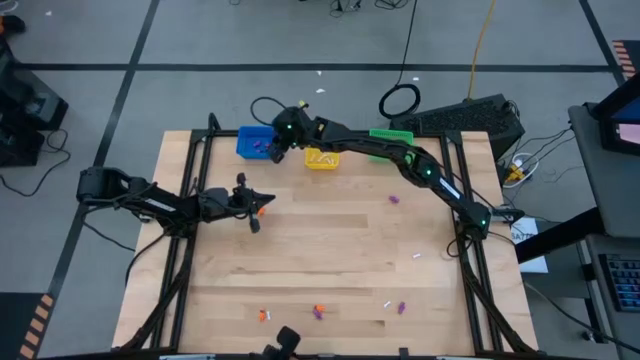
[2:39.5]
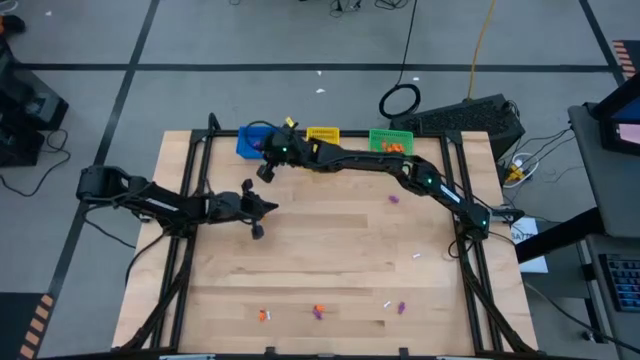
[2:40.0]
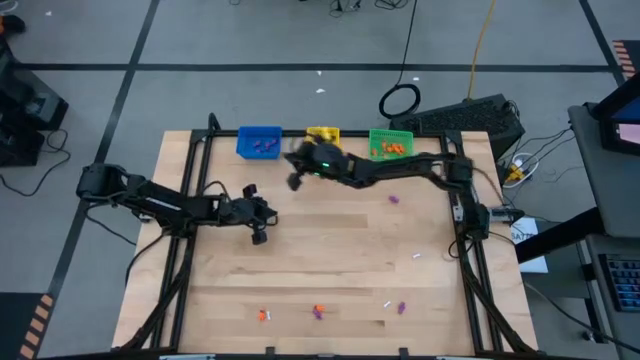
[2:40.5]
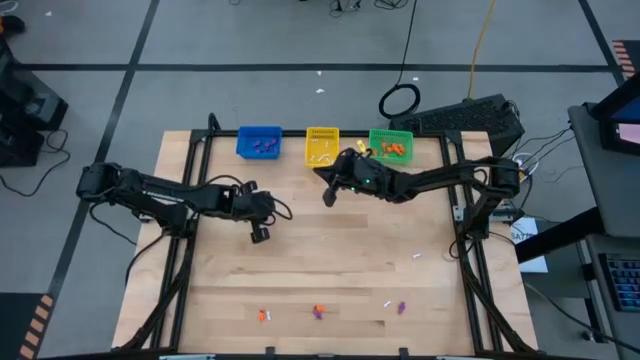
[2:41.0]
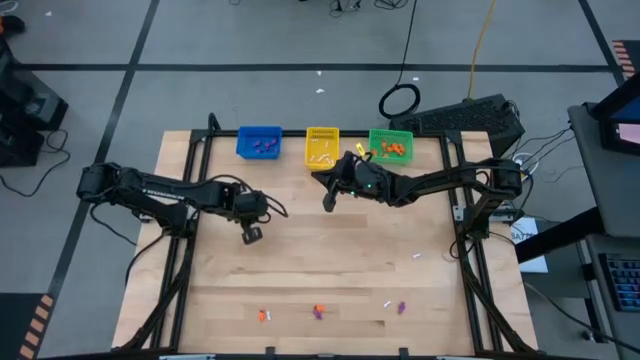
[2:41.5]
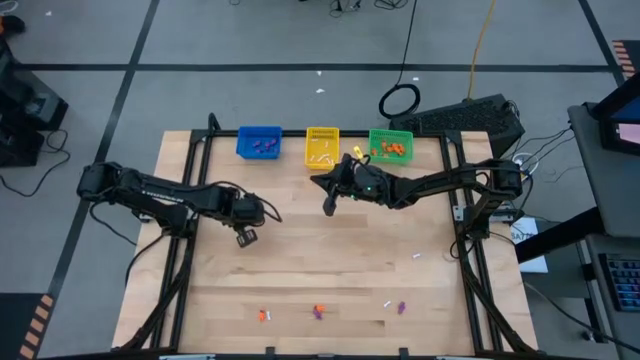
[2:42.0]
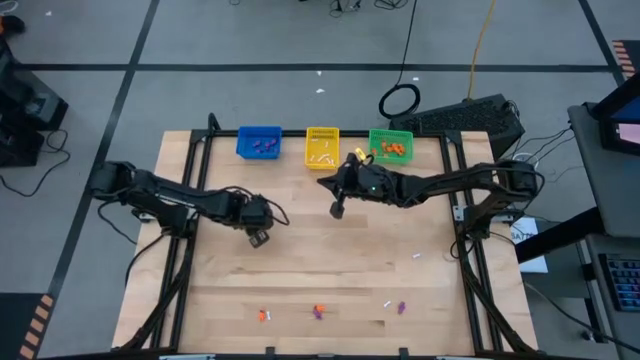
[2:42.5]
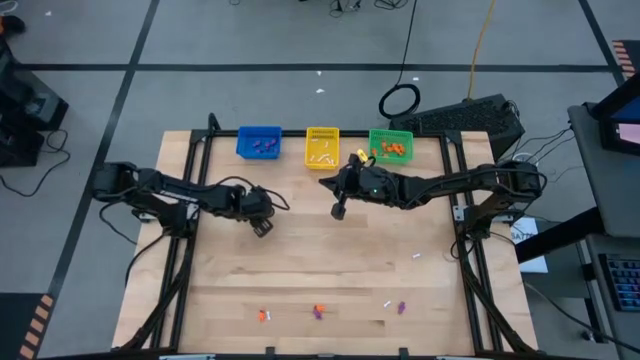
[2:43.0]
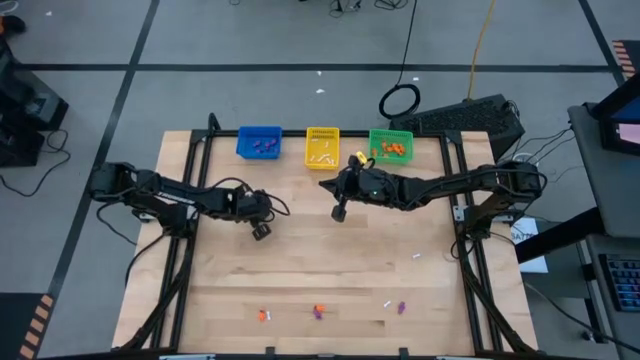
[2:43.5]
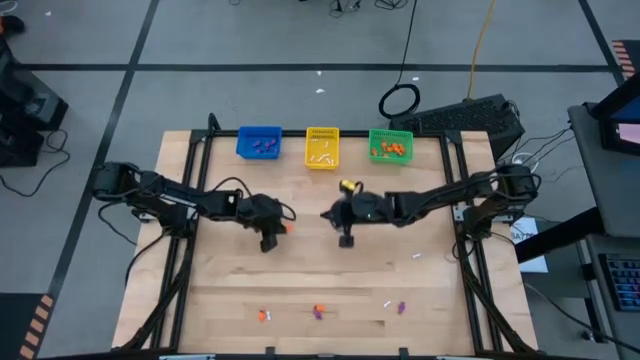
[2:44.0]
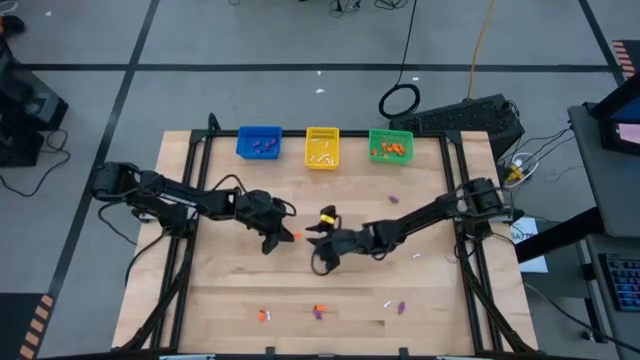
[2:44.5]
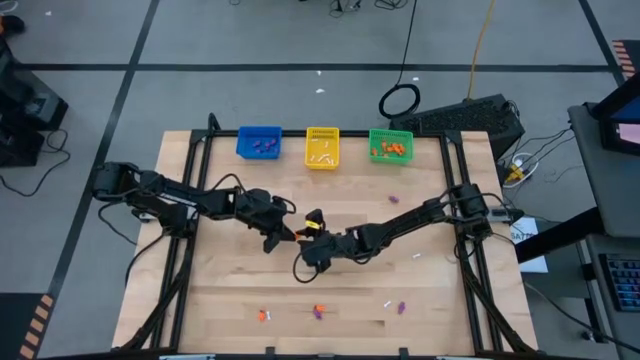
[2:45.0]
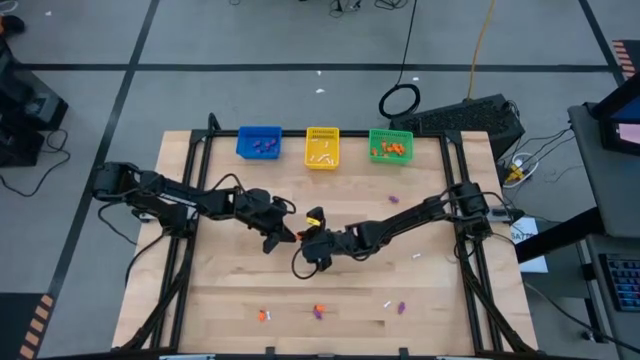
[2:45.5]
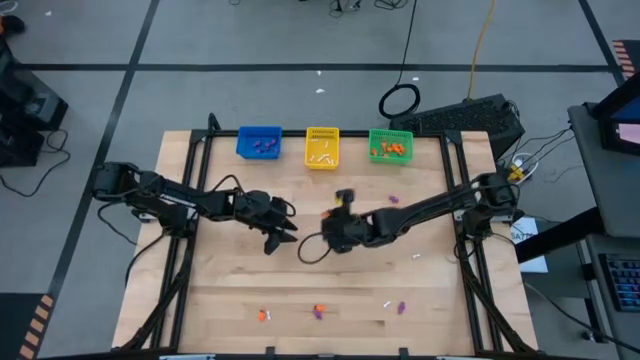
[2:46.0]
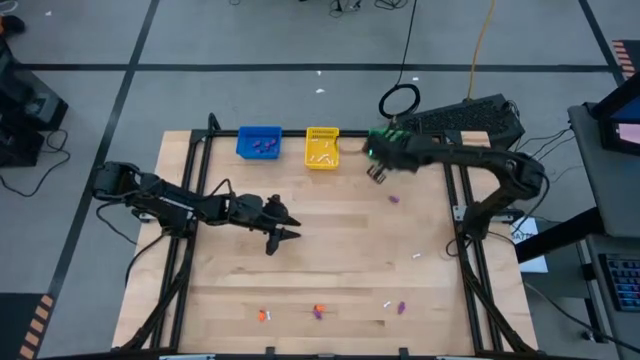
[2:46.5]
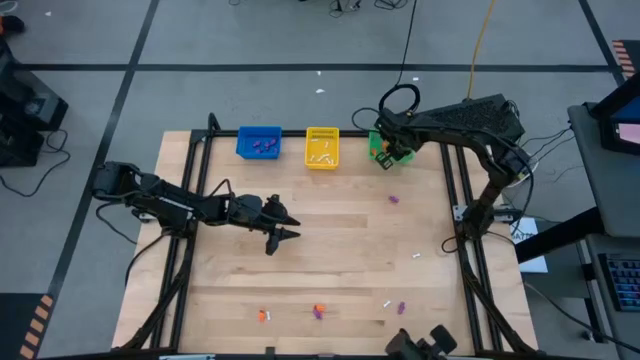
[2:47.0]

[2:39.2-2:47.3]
Task: Sort Halloween decoration
Put the orange skeleton toy into the green bin

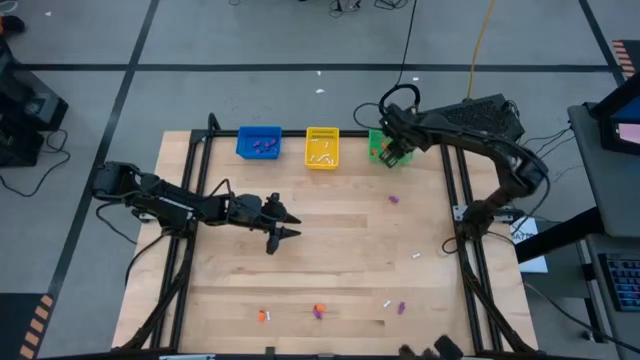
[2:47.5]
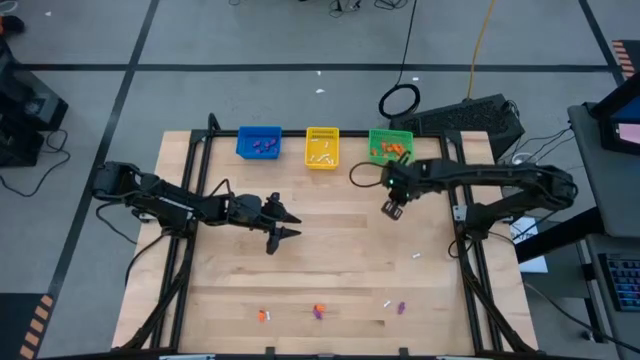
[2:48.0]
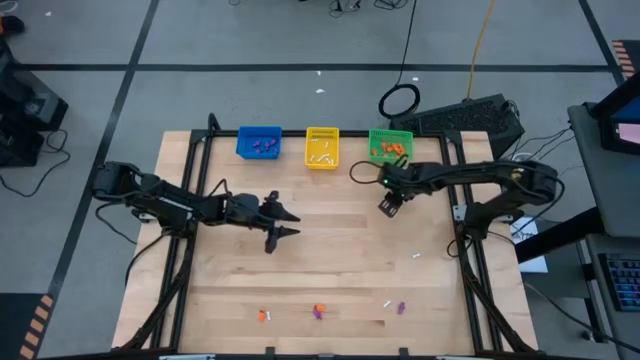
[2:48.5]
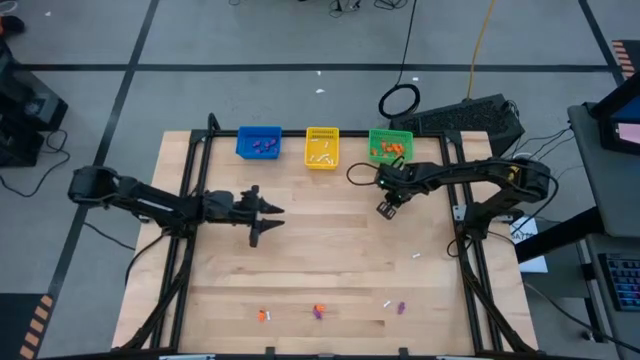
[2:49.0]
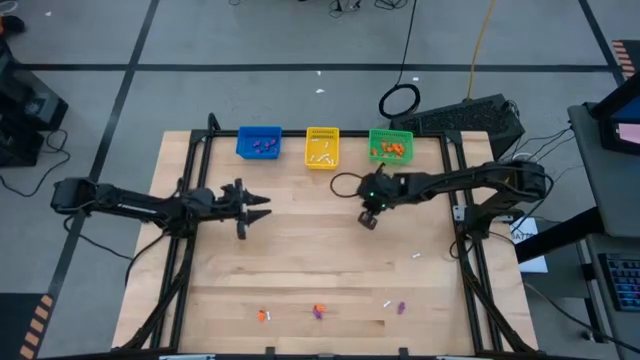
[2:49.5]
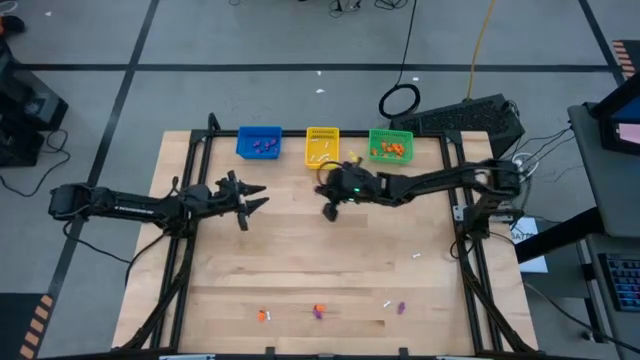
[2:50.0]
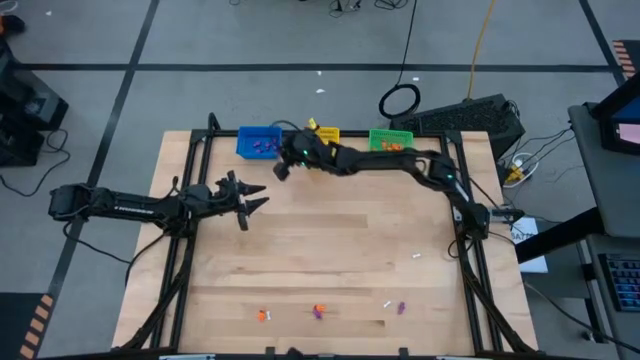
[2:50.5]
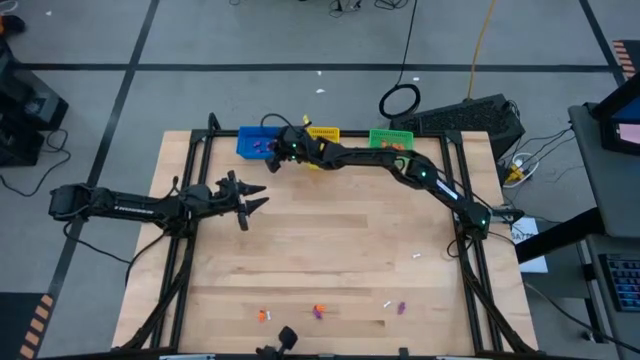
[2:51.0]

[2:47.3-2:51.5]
Put the violet skeleton toy into the blue bin

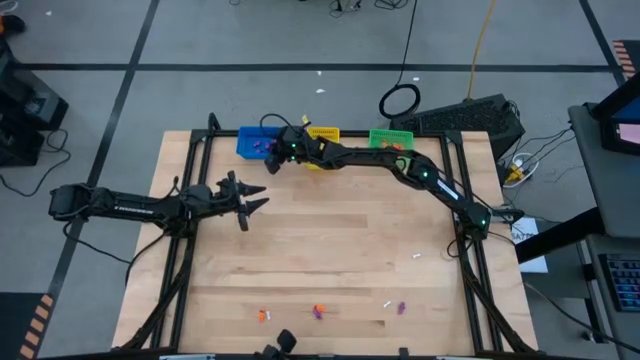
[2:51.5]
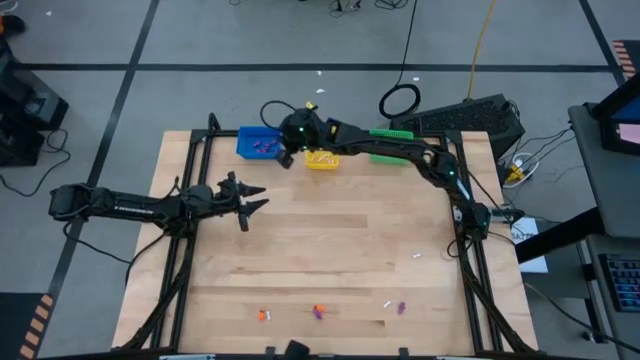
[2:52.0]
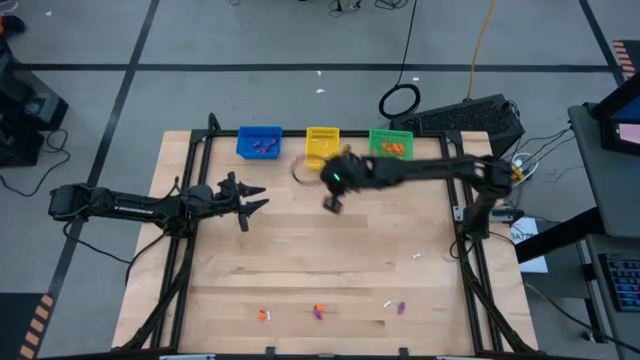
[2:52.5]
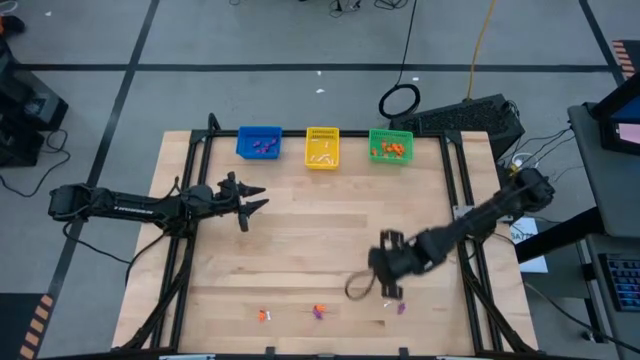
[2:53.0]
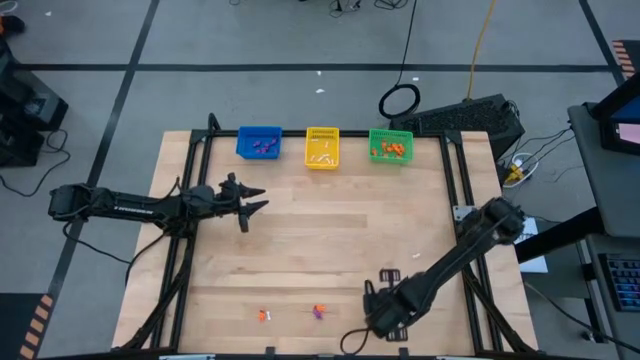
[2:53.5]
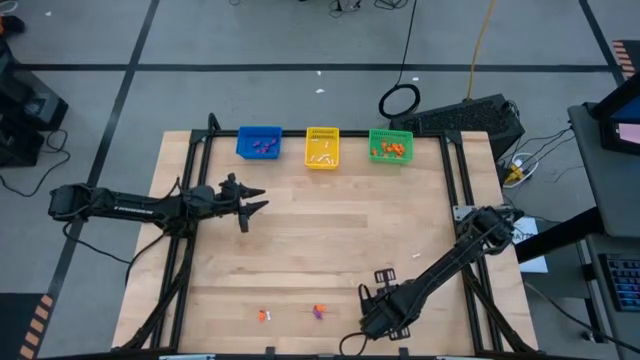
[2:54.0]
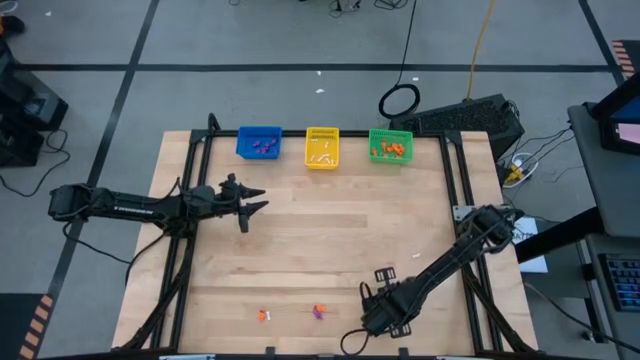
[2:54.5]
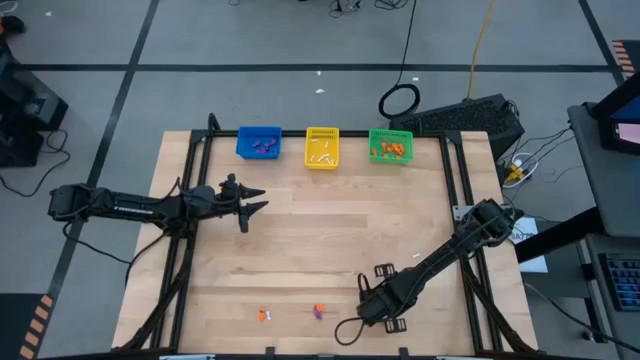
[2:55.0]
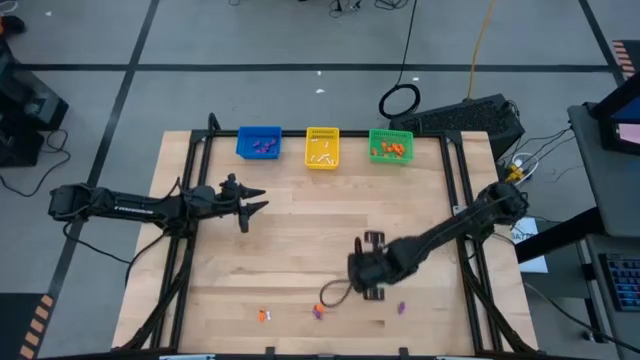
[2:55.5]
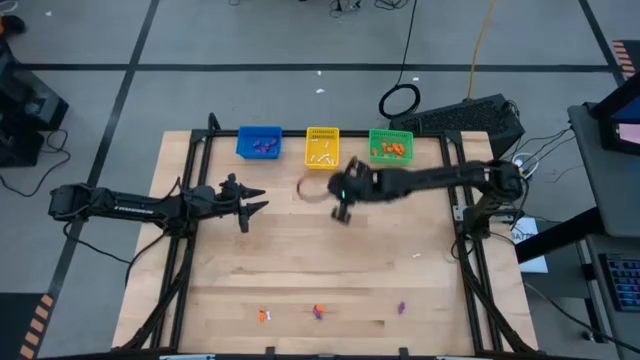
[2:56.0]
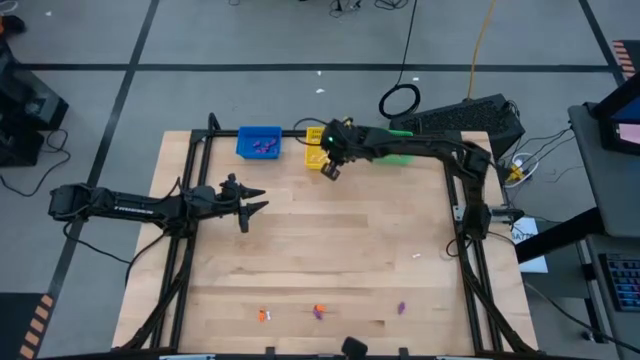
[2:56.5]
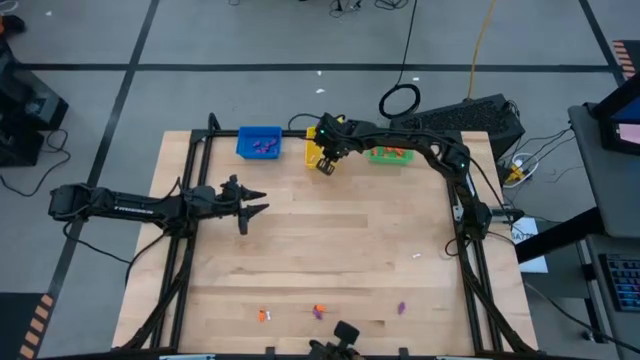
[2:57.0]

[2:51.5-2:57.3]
Put the white bone toy into the yellow bin

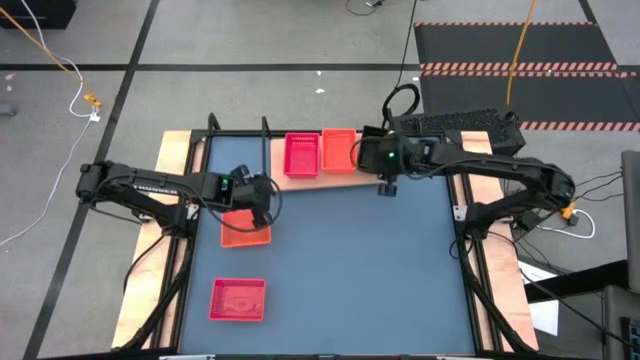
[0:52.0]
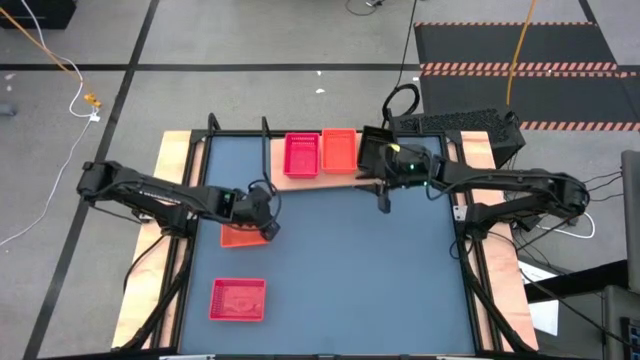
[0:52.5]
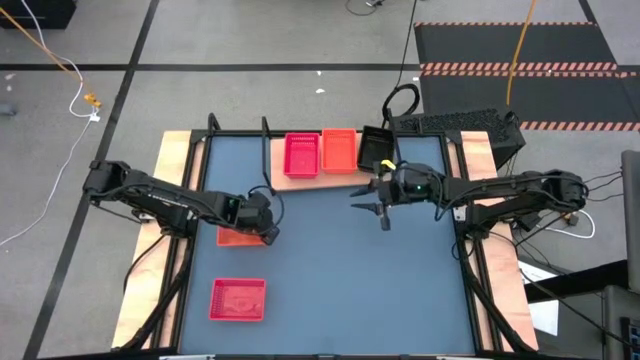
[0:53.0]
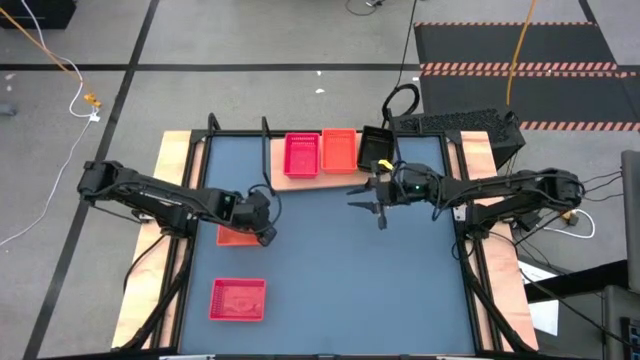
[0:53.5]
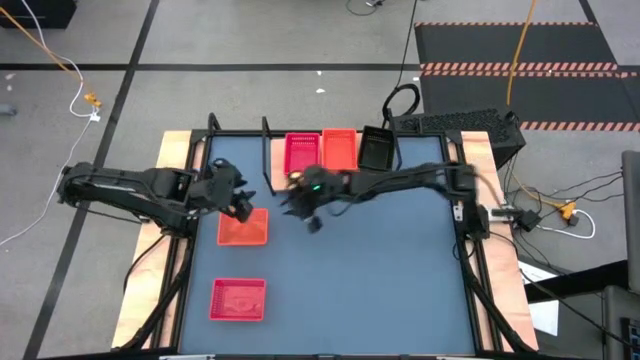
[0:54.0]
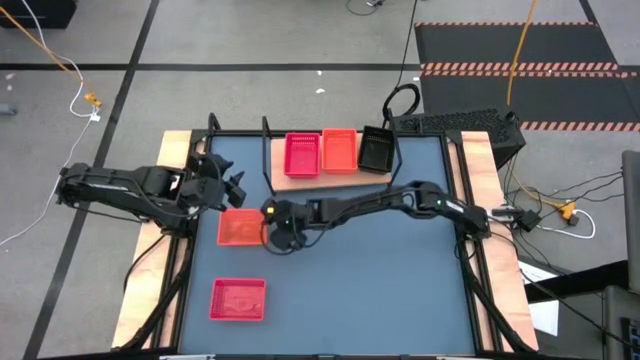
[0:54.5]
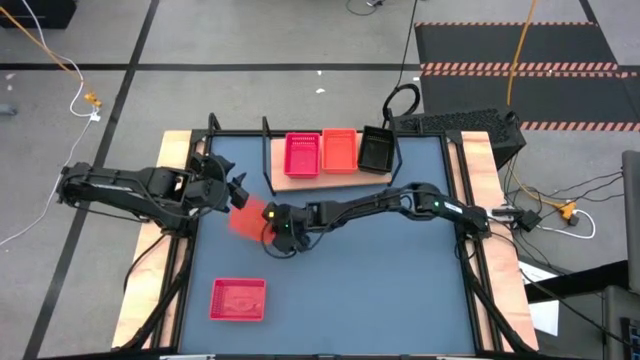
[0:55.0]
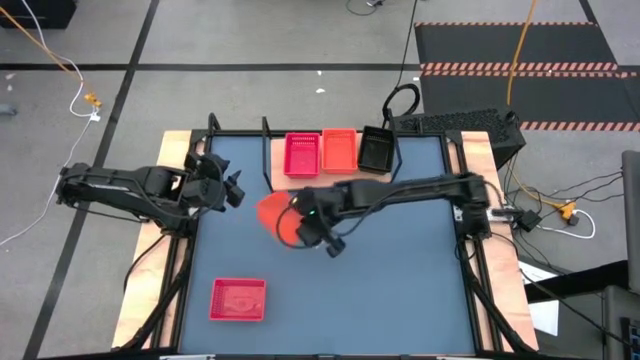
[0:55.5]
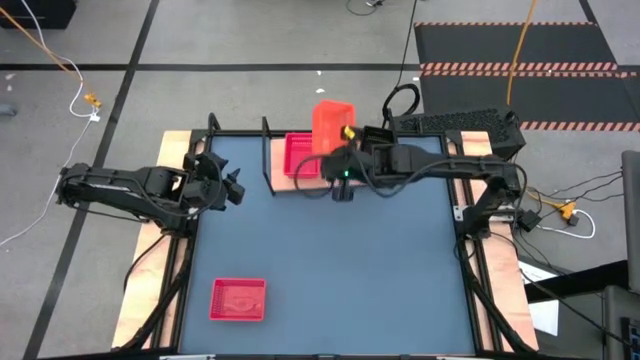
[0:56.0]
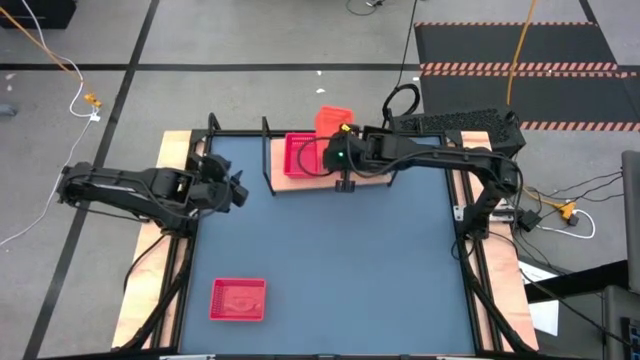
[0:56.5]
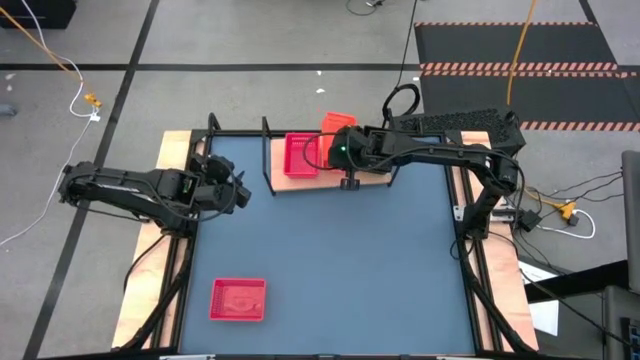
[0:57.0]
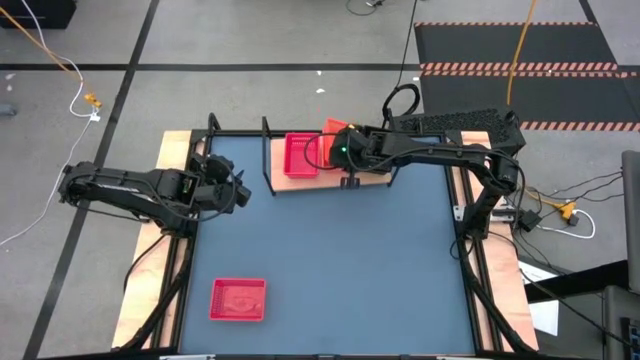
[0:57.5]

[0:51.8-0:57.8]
Task: Stack baskets on shelf by color
Stack the orange bin on the orange bin on the shelf
